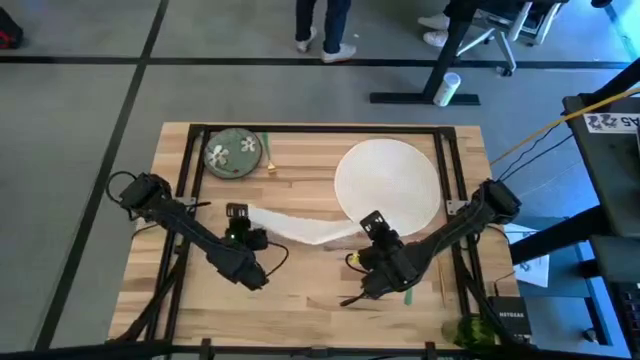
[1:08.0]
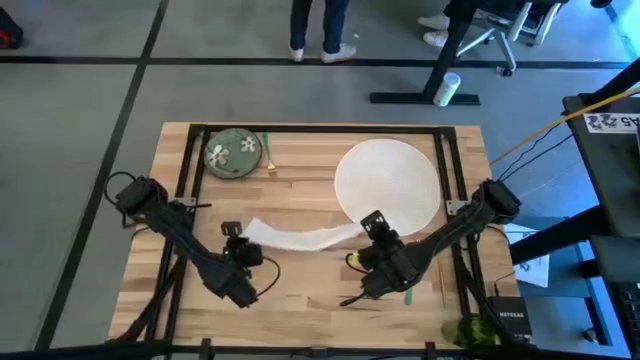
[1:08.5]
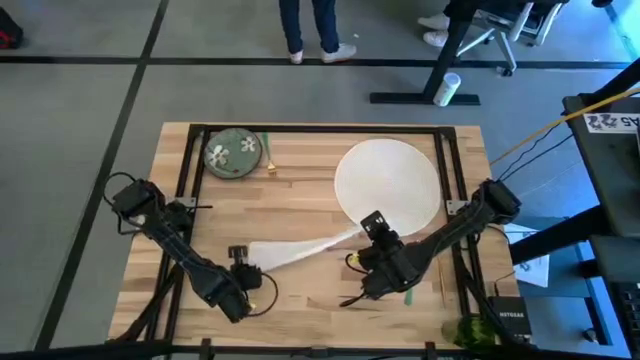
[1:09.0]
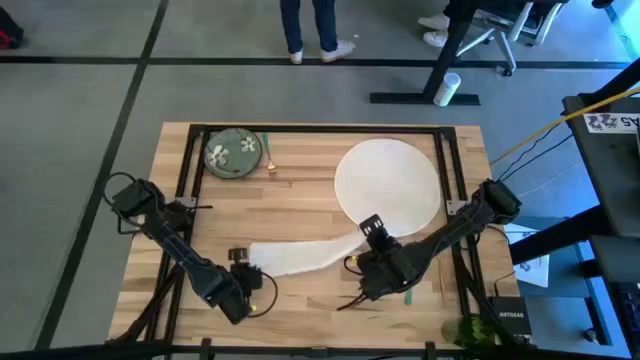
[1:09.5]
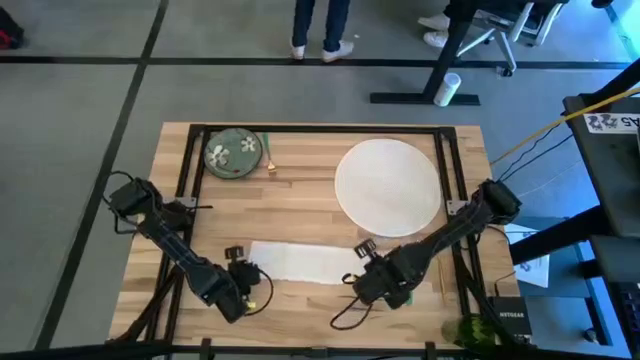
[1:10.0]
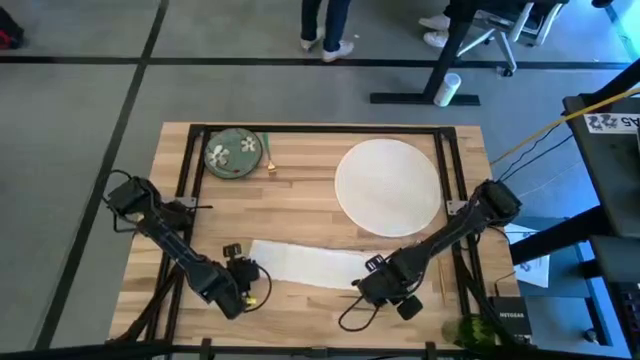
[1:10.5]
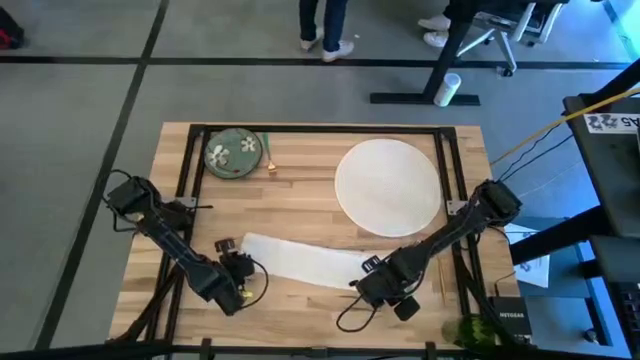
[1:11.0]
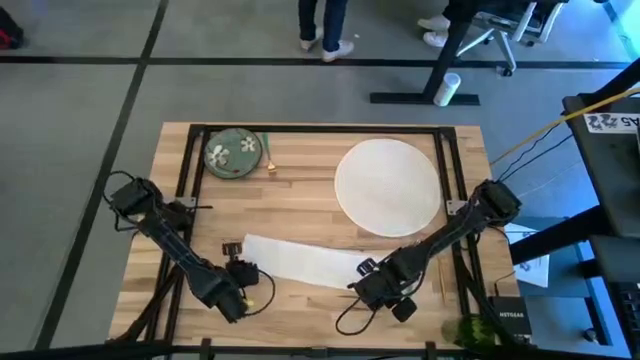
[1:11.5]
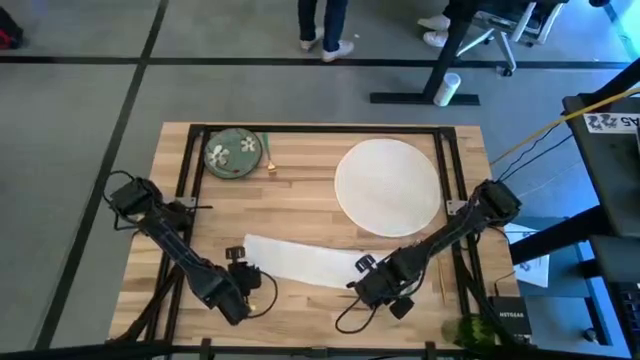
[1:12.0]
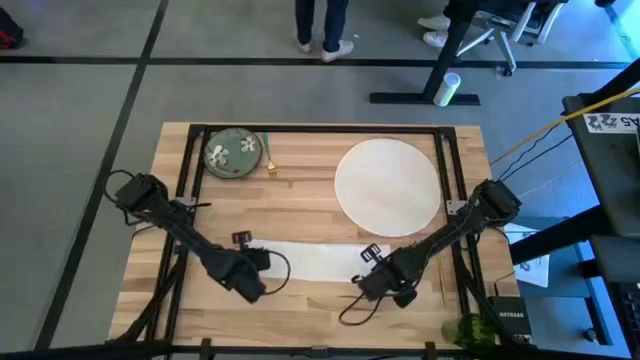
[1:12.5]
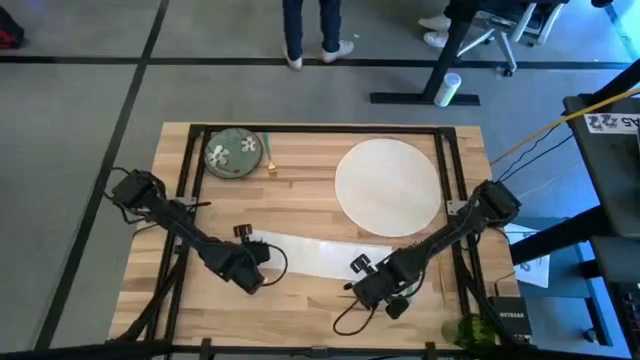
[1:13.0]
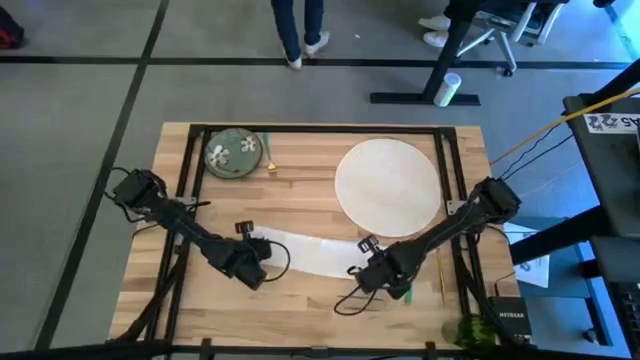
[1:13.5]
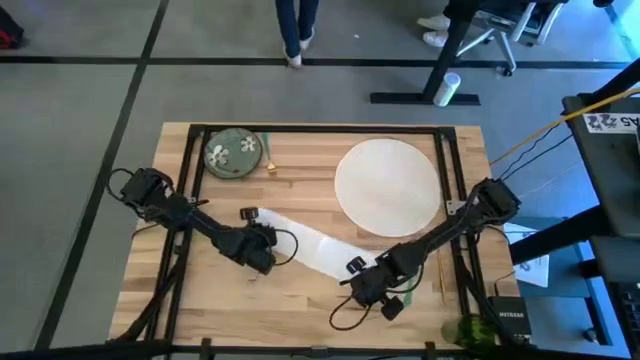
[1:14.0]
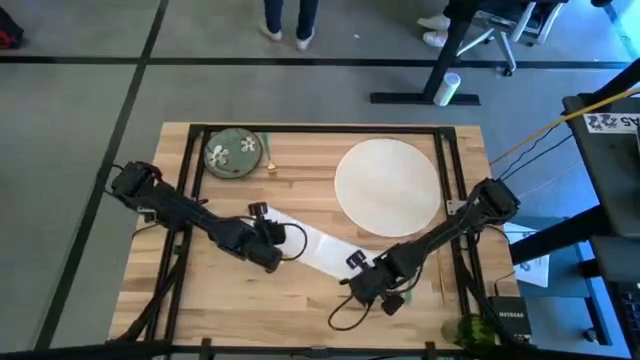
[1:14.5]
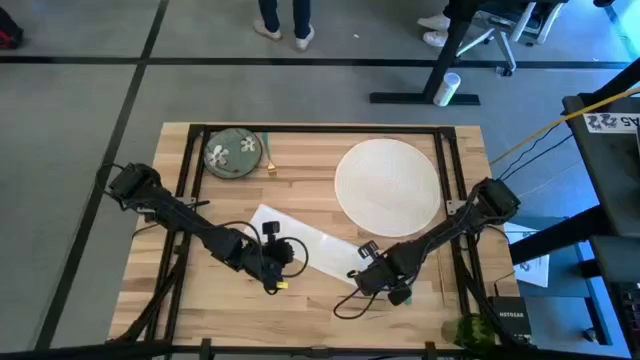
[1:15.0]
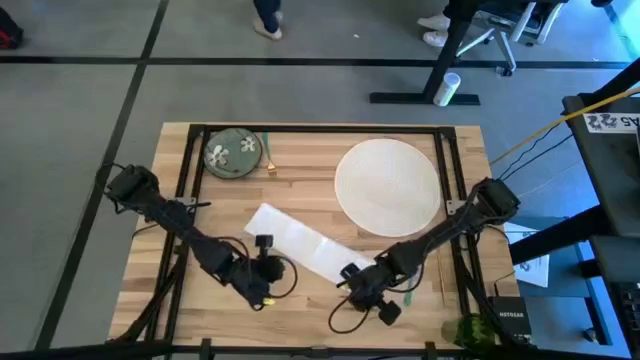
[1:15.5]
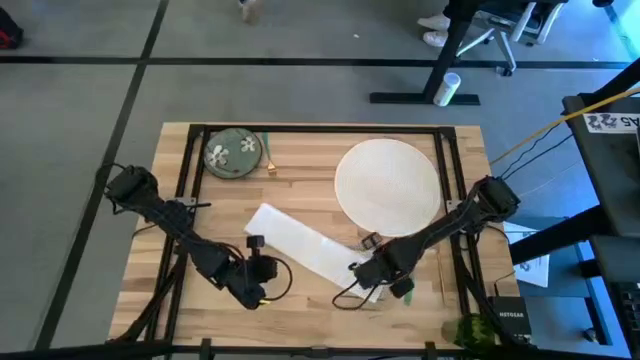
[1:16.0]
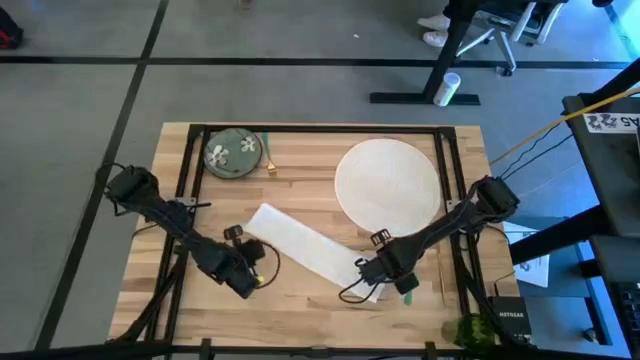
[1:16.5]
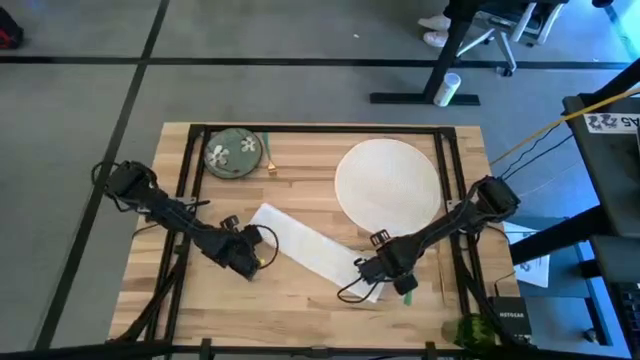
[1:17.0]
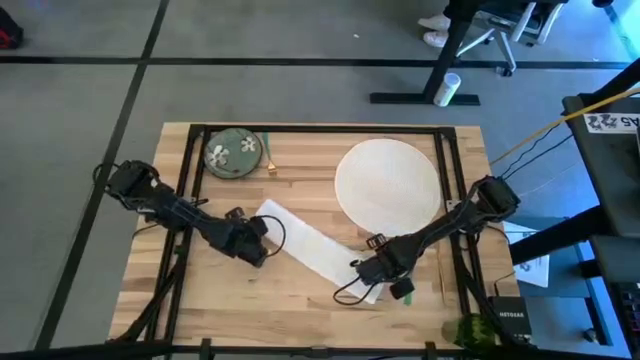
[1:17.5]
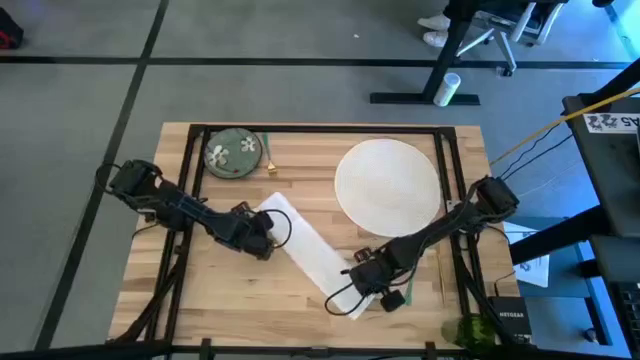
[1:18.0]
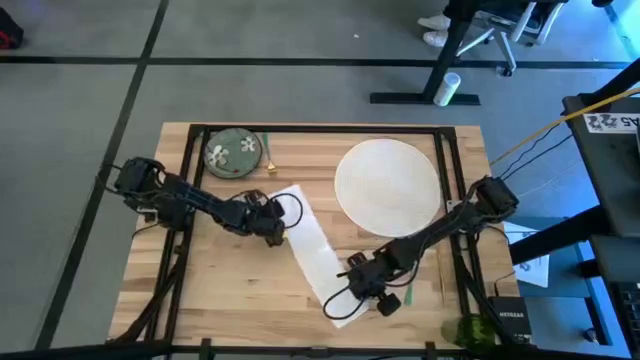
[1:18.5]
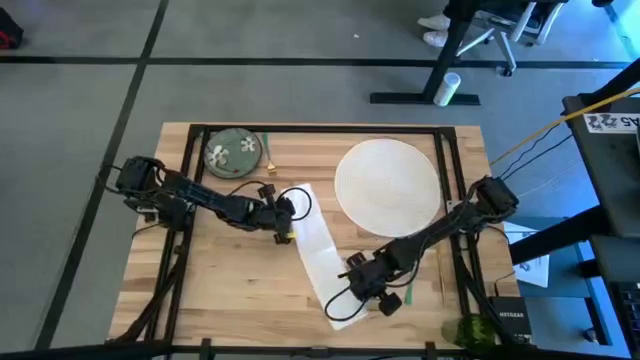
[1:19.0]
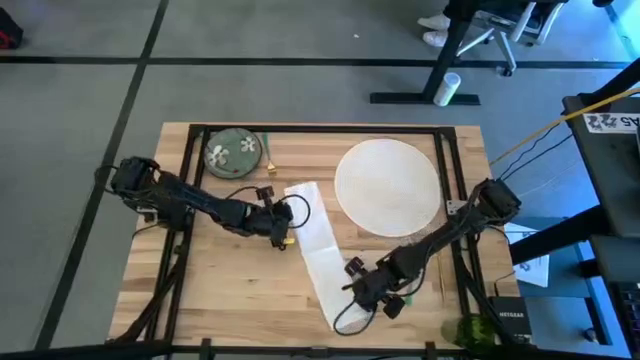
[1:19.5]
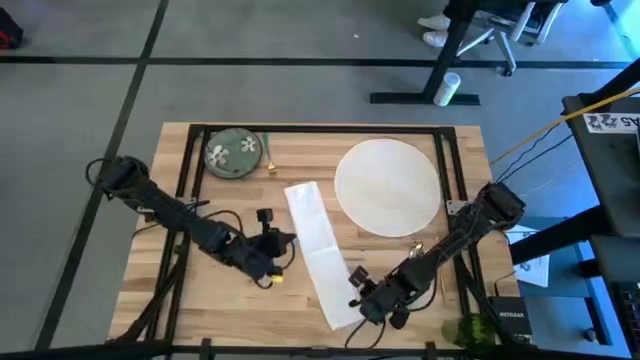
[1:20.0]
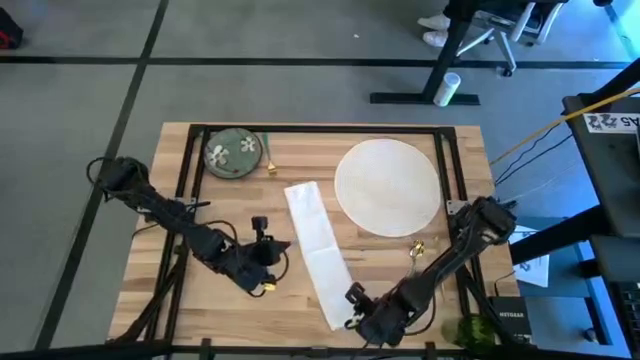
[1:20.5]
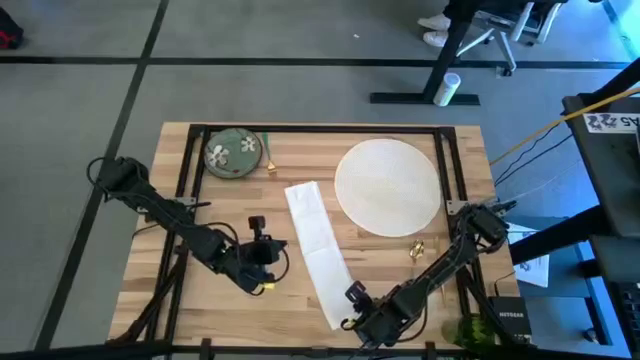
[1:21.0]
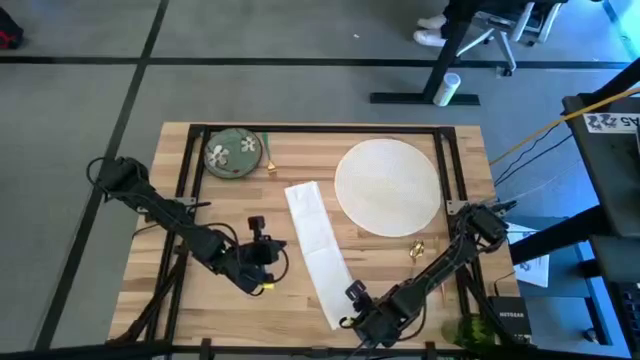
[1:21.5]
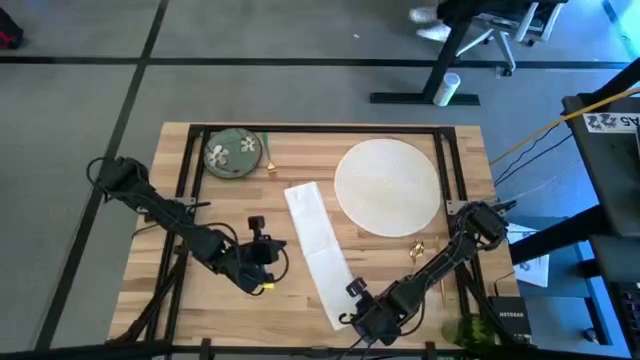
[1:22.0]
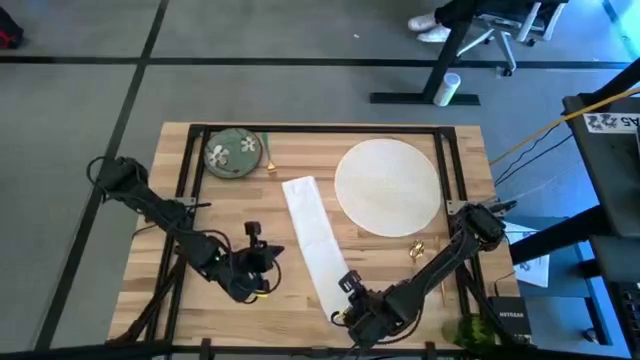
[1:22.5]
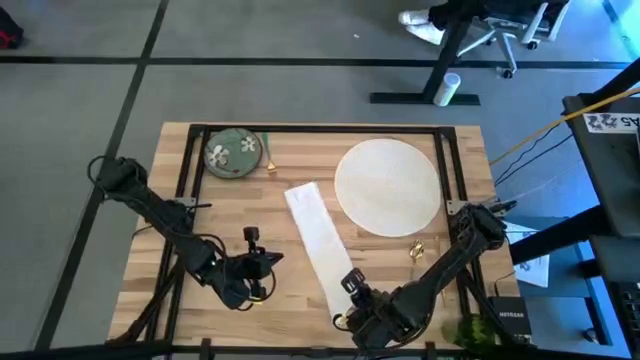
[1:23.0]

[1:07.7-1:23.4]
Task: Set table place
Fold the white table napkin
